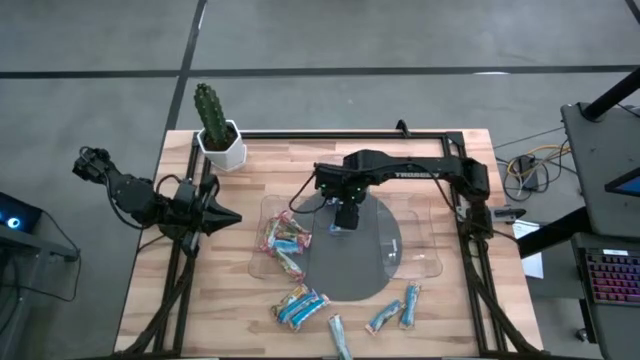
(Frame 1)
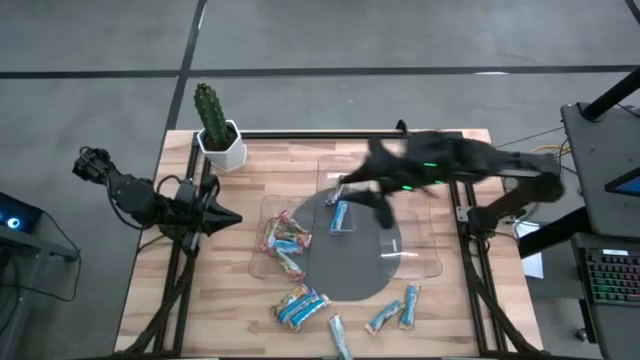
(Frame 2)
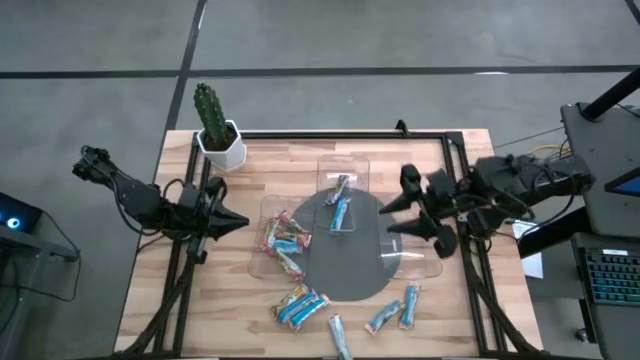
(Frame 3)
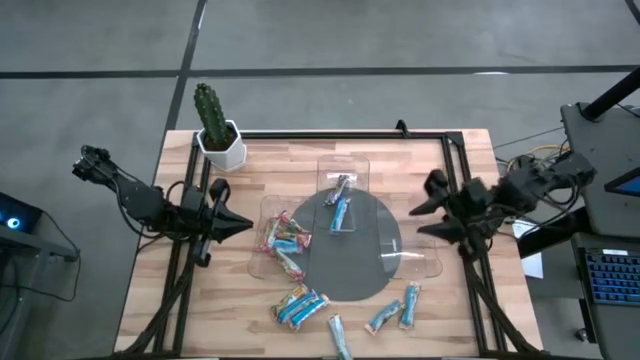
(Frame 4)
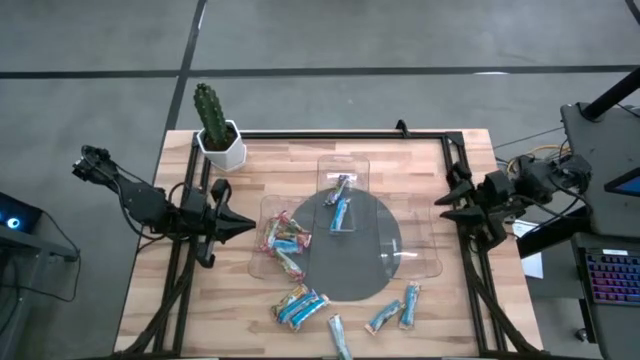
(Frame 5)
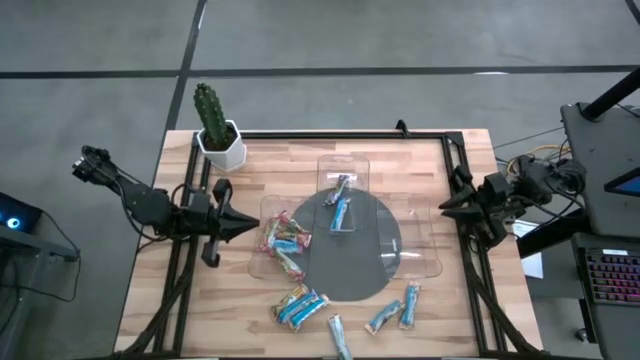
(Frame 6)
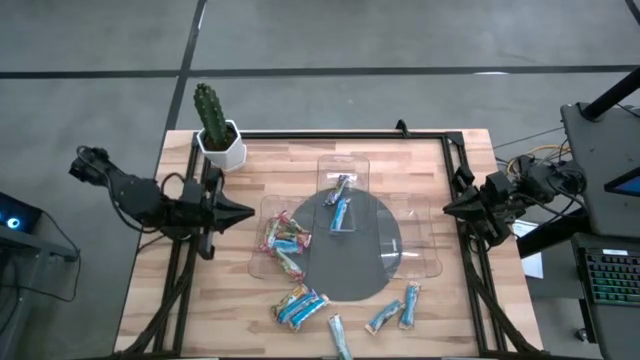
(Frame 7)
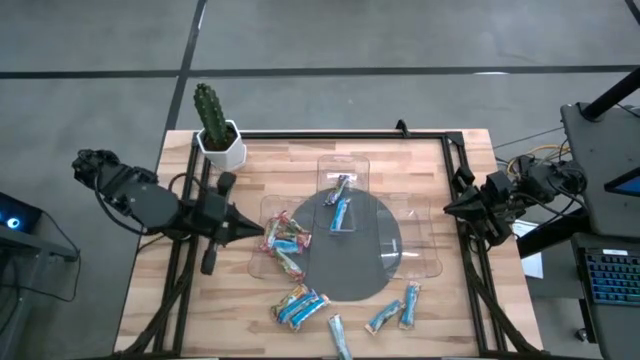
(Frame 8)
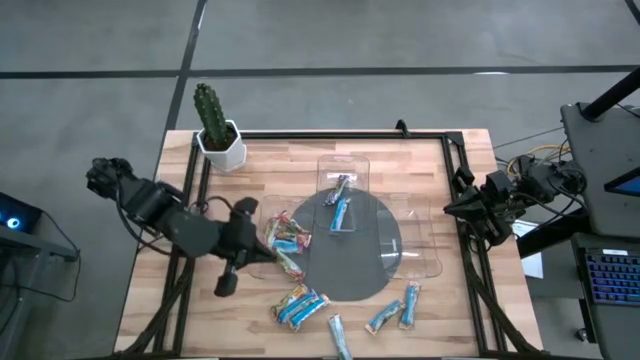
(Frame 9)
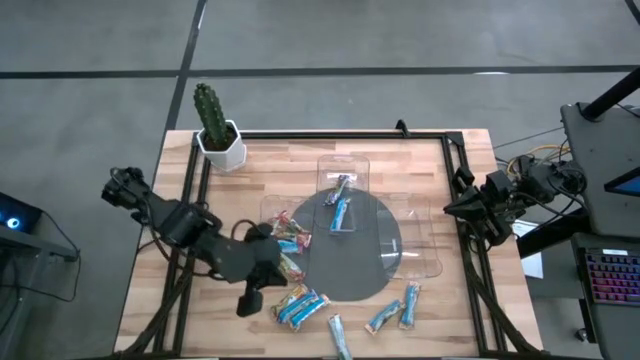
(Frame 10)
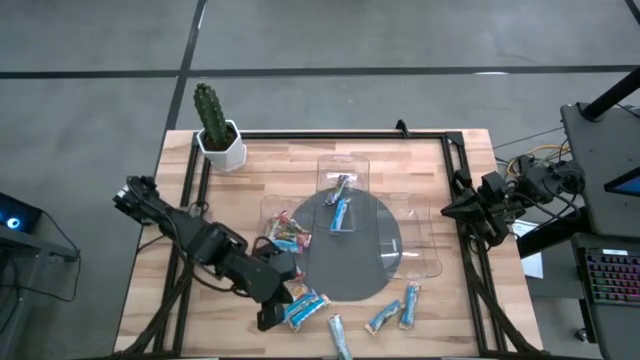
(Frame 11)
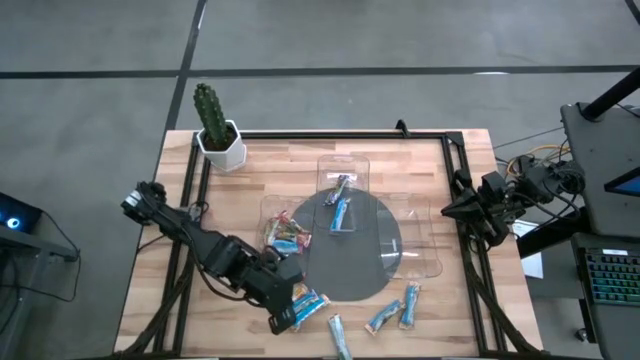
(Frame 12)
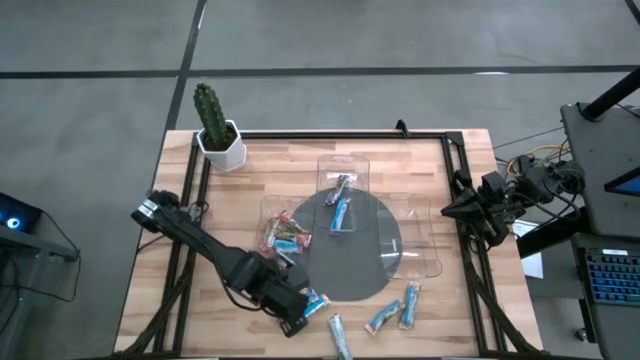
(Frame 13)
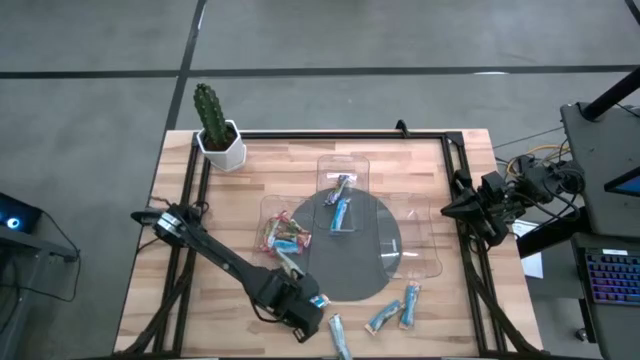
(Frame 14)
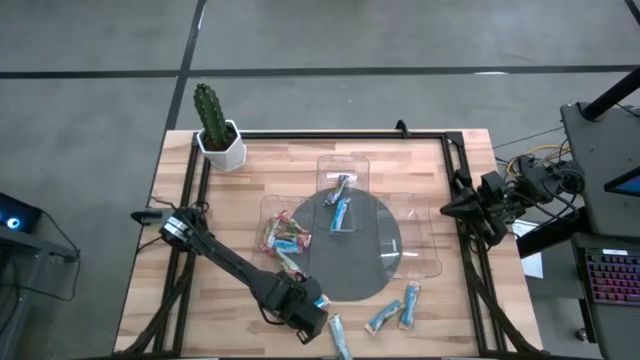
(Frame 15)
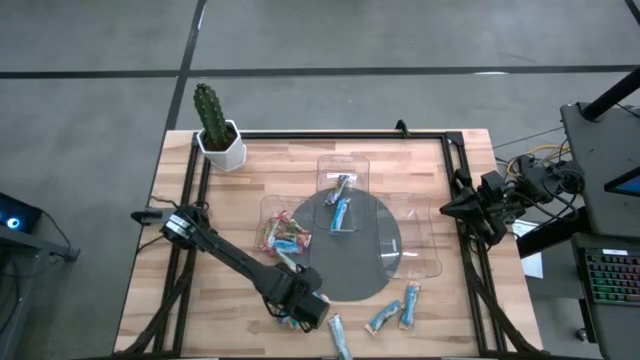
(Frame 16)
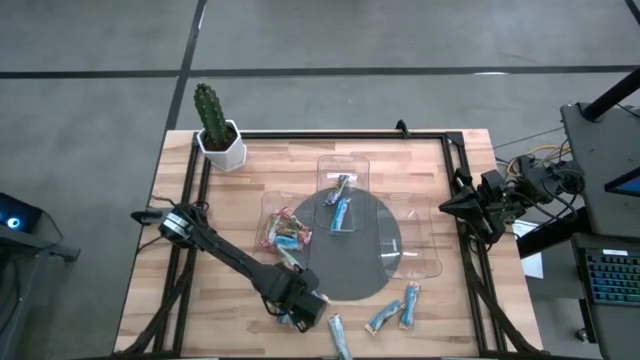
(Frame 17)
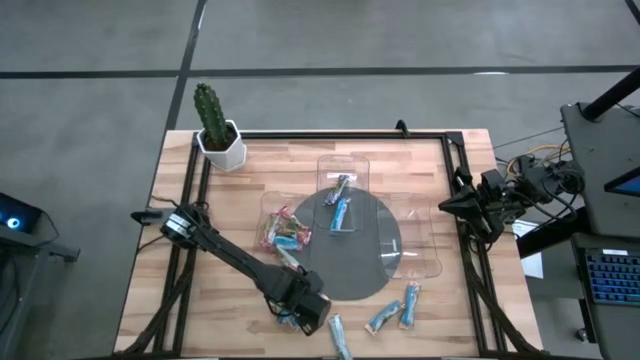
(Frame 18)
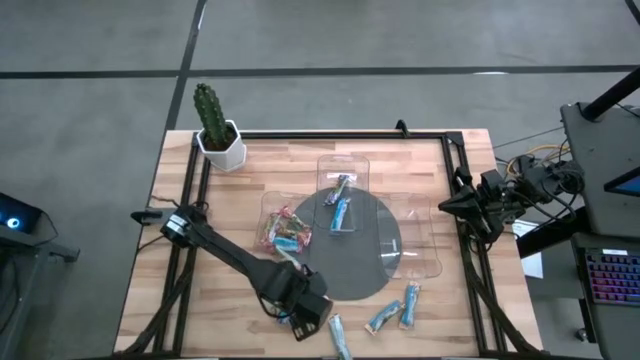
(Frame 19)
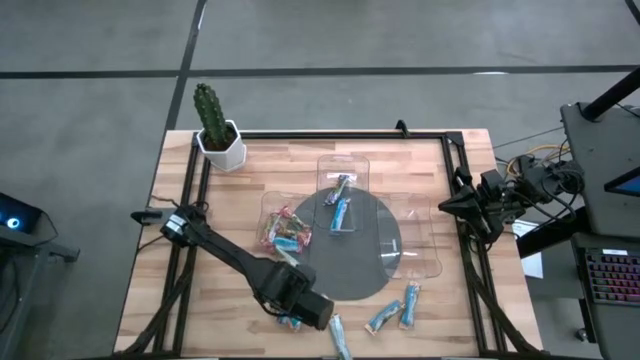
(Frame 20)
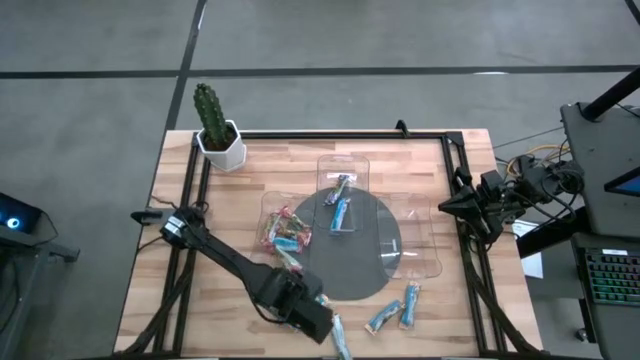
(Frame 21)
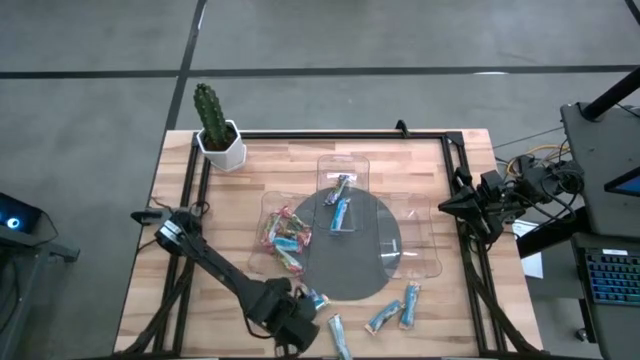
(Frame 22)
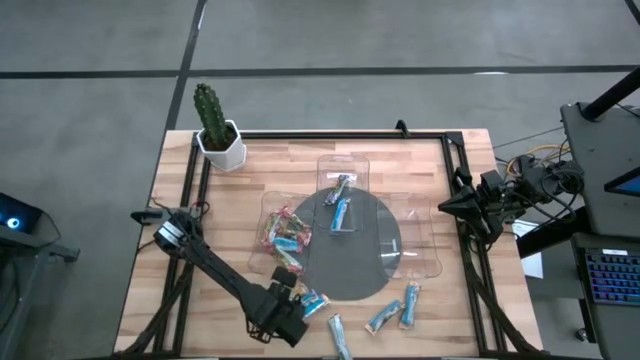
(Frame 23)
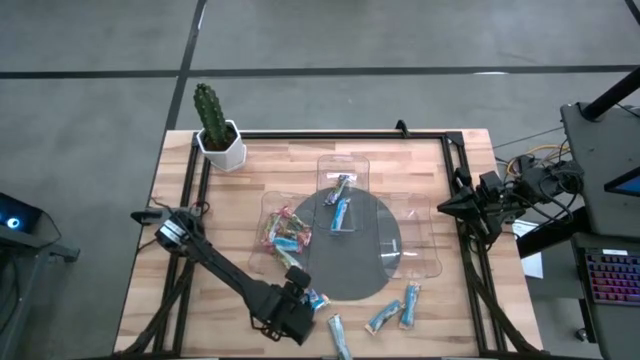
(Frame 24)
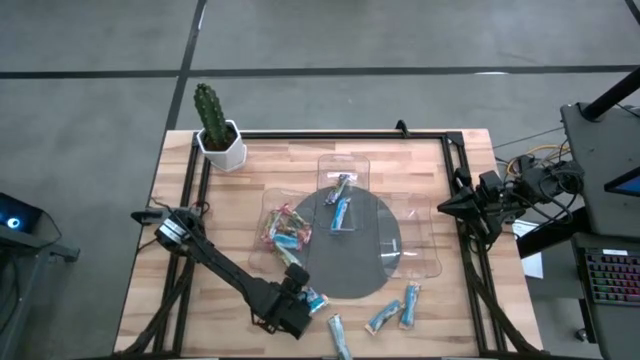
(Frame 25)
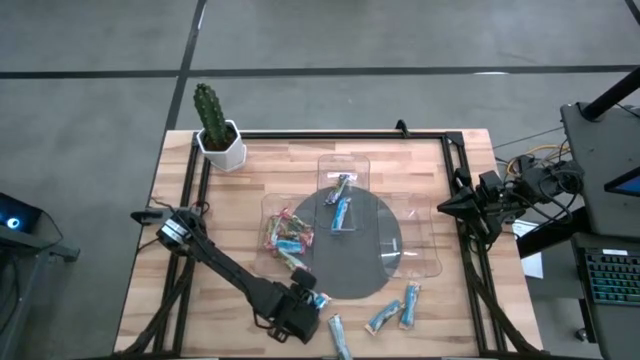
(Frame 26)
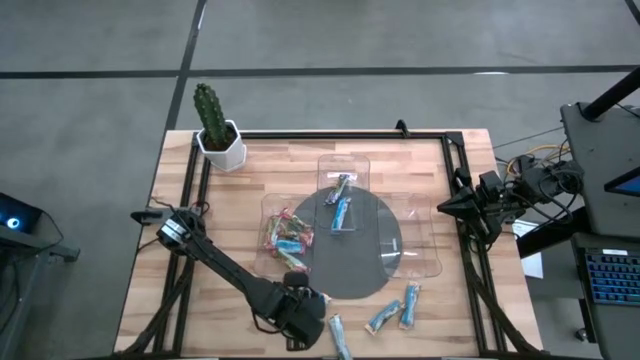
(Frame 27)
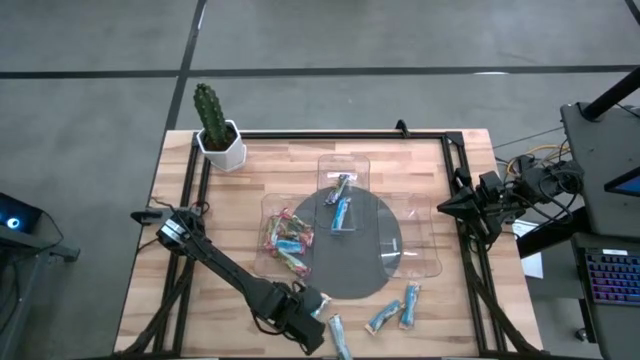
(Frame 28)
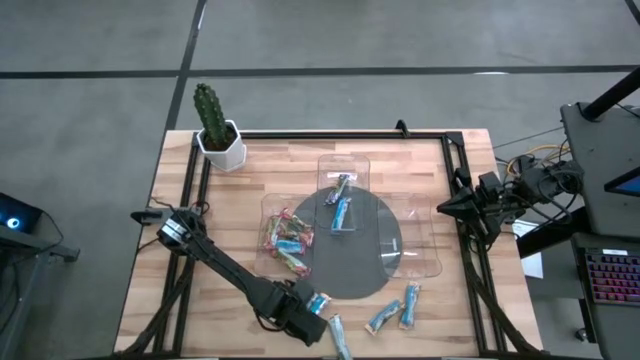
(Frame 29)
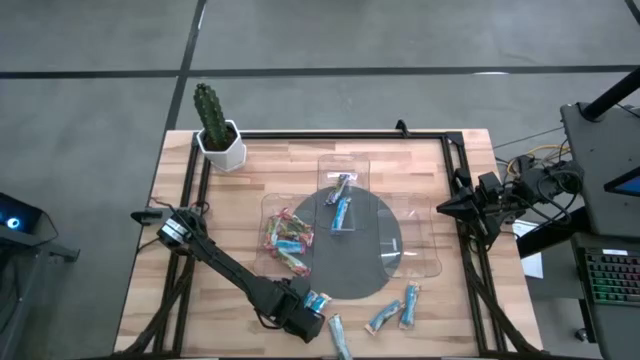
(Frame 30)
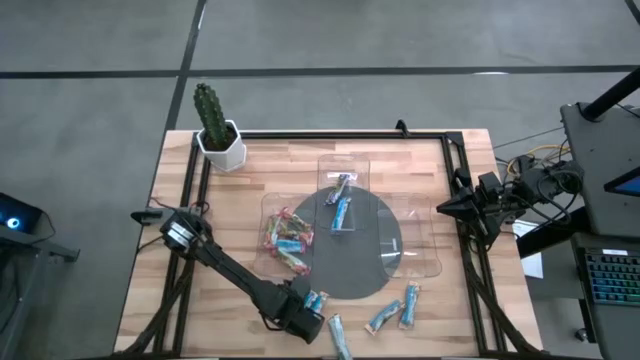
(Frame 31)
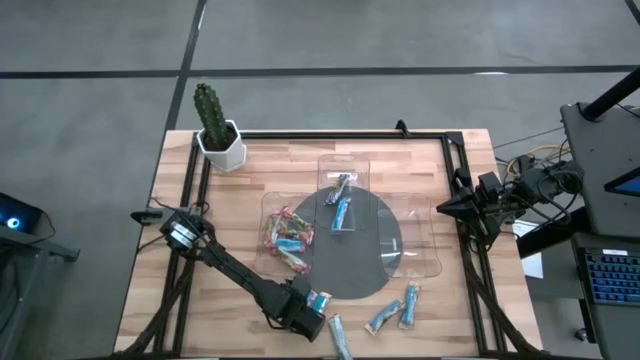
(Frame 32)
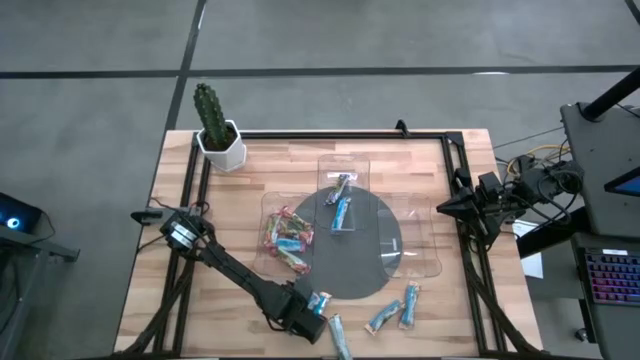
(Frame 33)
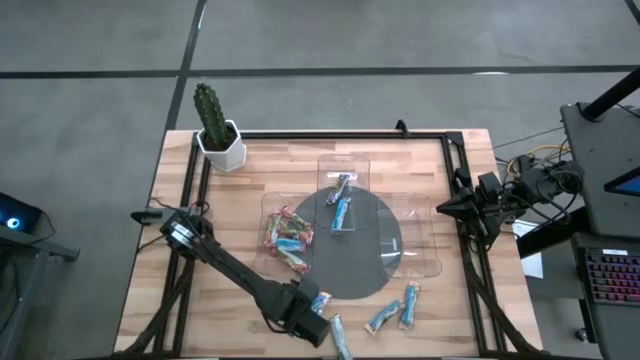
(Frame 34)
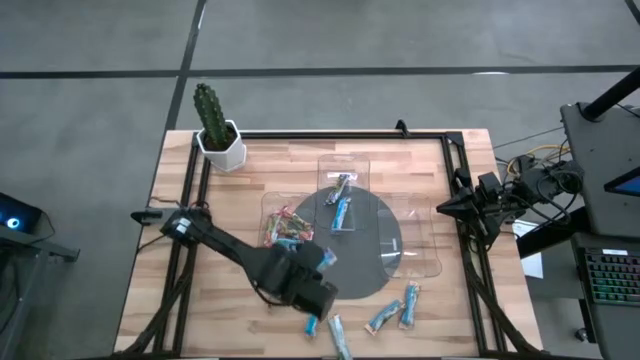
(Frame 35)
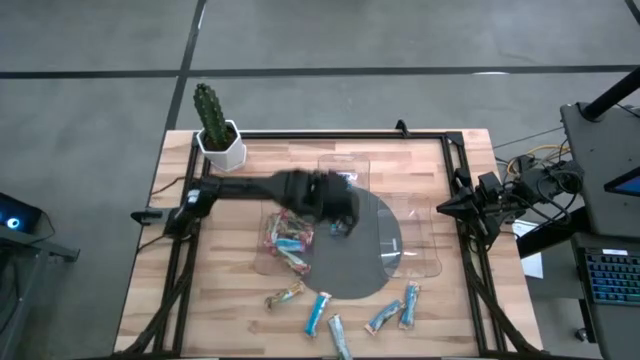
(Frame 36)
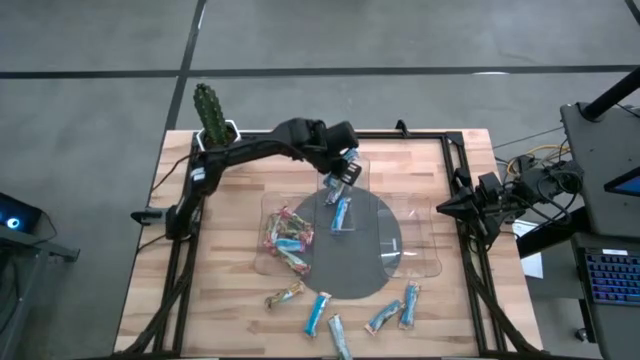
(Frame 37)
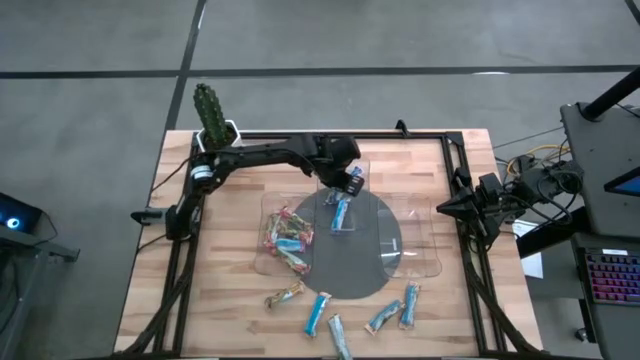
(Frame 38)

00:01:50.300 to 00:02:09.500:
Task: Pick and place Granola Bars by type
Put the blue granola bar into the top transparent bin
